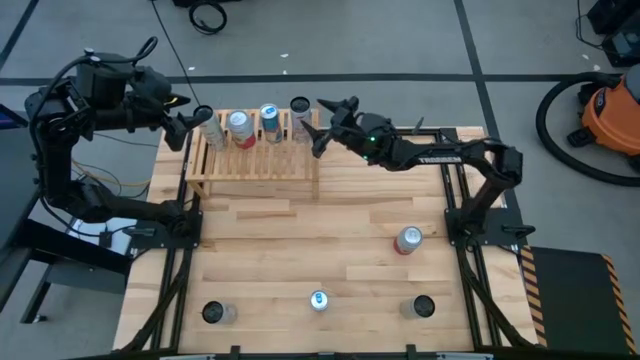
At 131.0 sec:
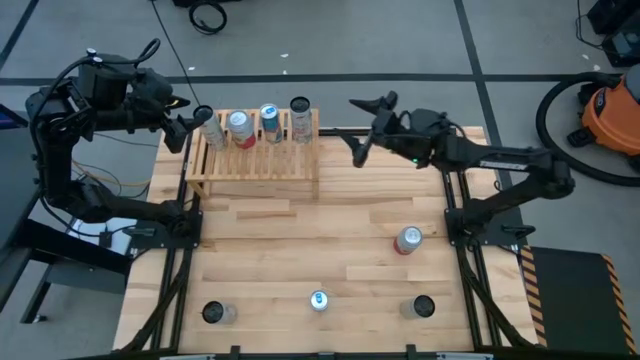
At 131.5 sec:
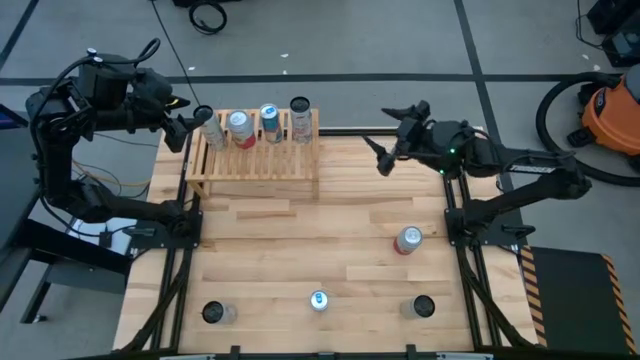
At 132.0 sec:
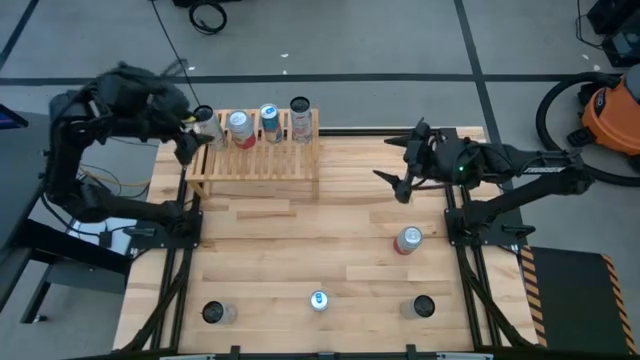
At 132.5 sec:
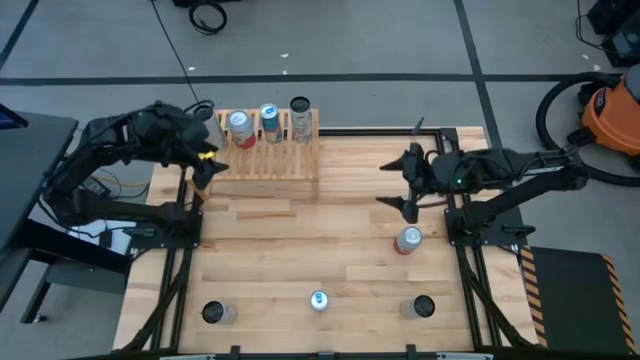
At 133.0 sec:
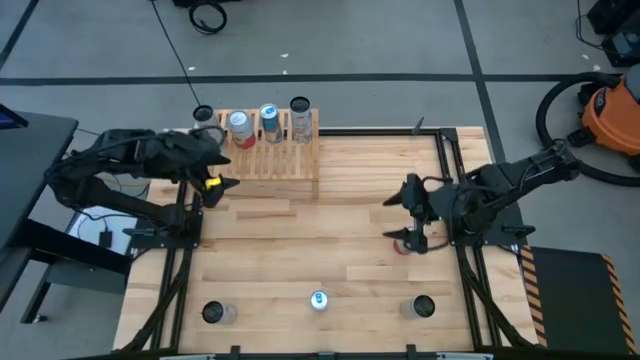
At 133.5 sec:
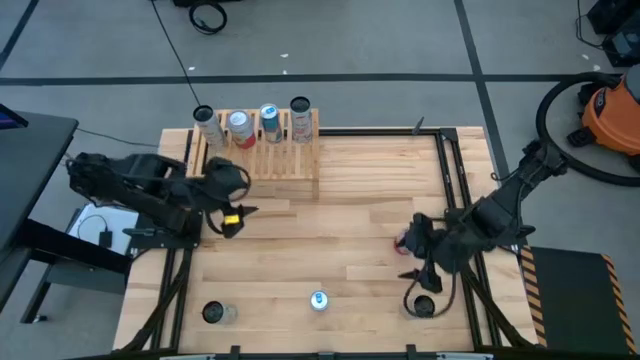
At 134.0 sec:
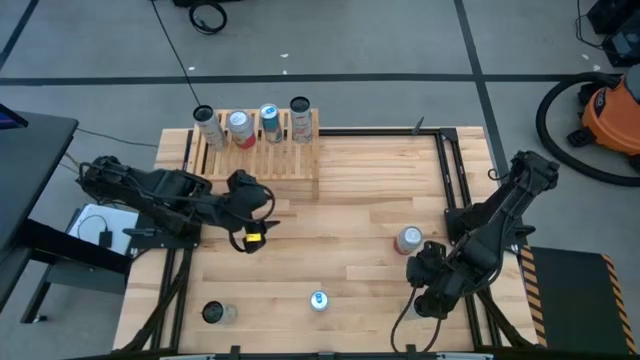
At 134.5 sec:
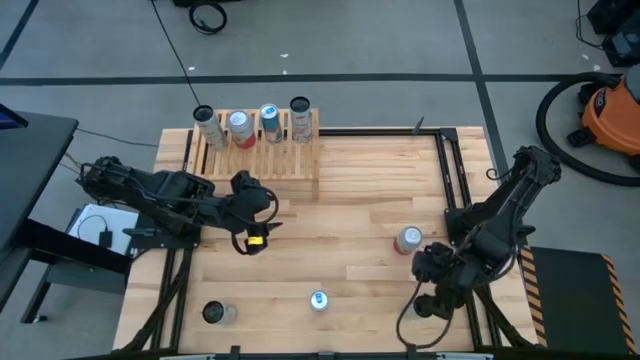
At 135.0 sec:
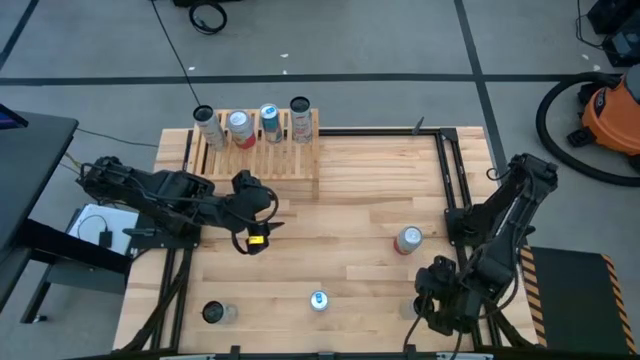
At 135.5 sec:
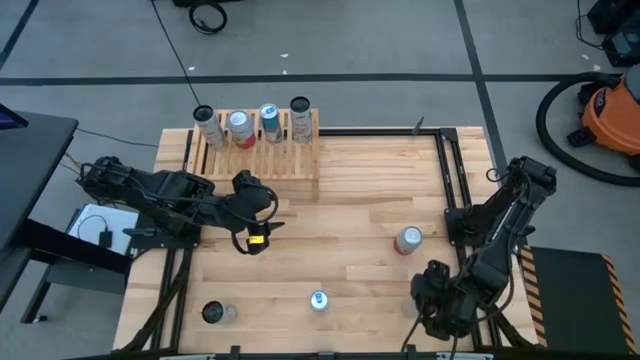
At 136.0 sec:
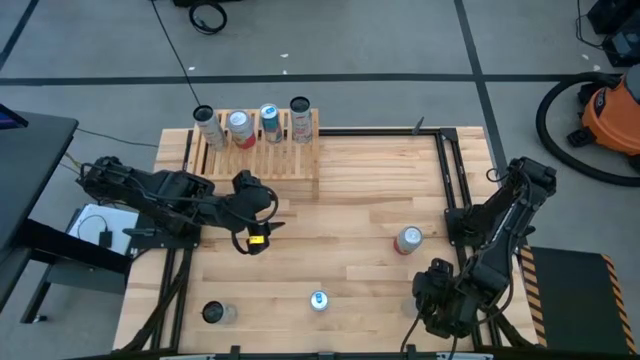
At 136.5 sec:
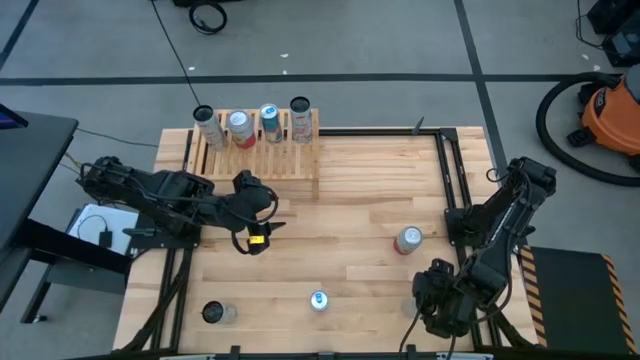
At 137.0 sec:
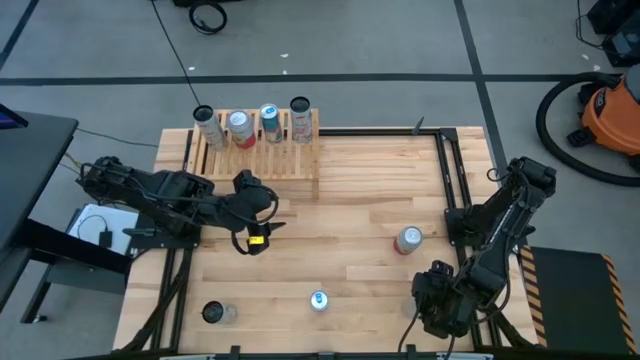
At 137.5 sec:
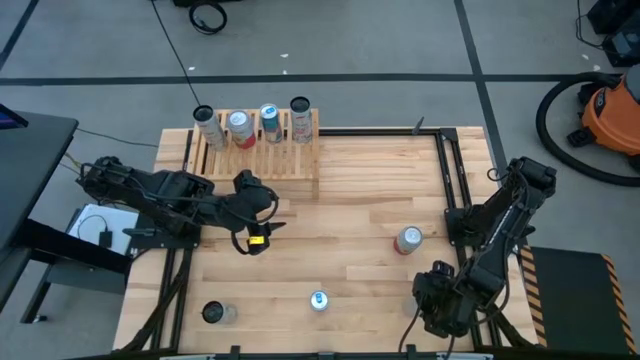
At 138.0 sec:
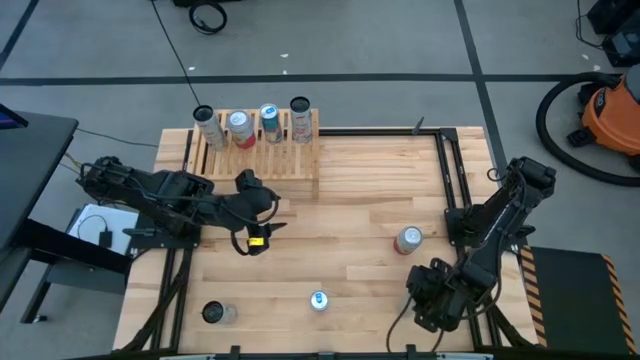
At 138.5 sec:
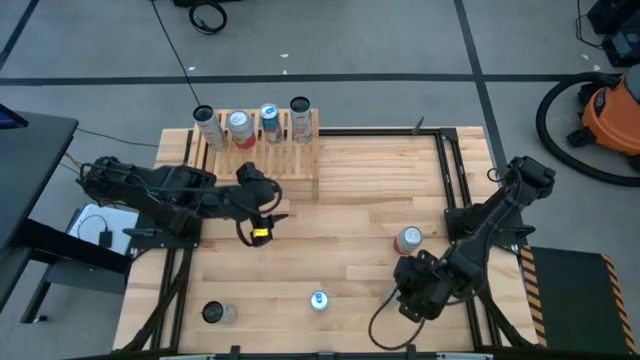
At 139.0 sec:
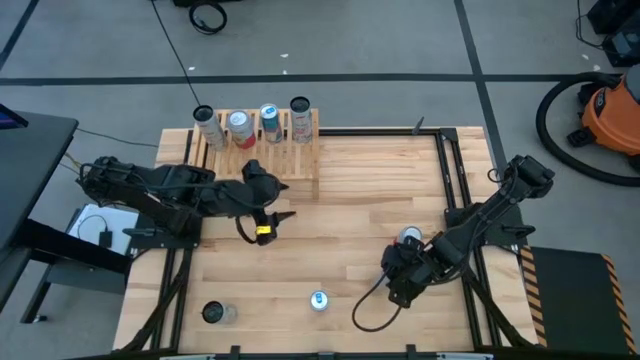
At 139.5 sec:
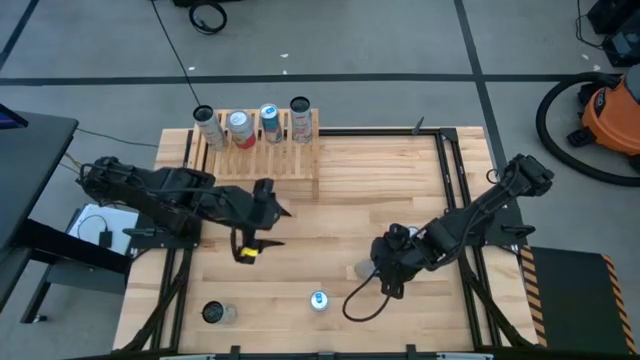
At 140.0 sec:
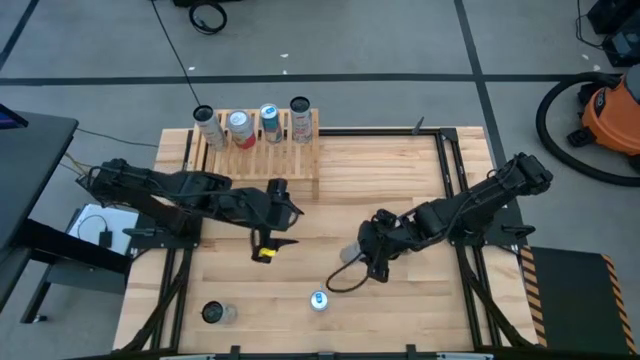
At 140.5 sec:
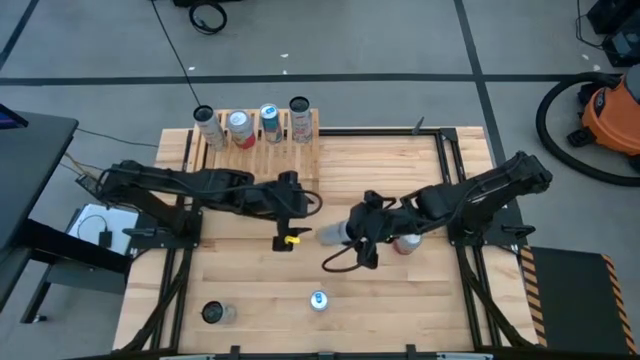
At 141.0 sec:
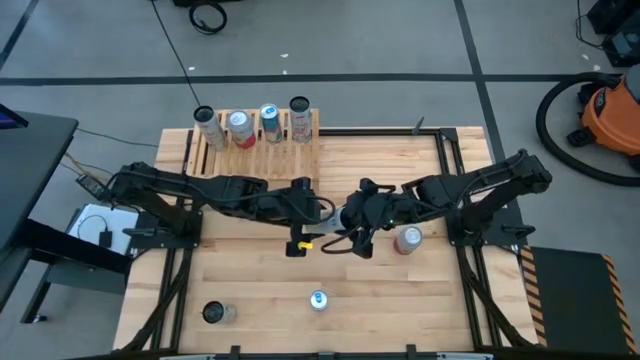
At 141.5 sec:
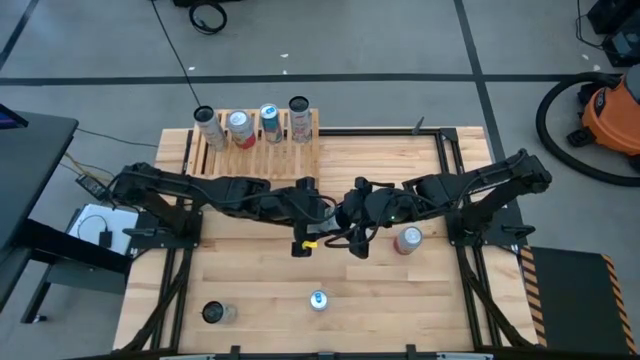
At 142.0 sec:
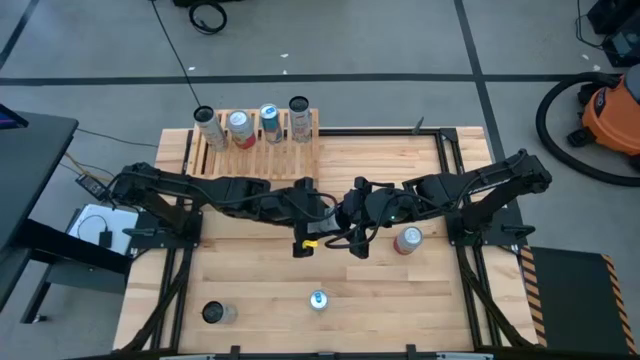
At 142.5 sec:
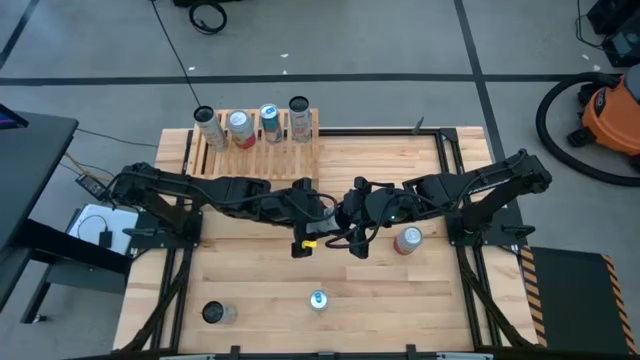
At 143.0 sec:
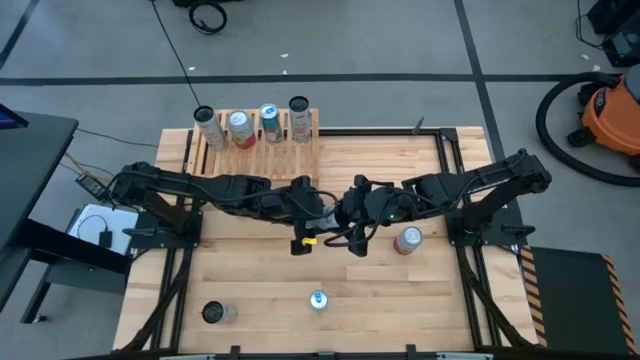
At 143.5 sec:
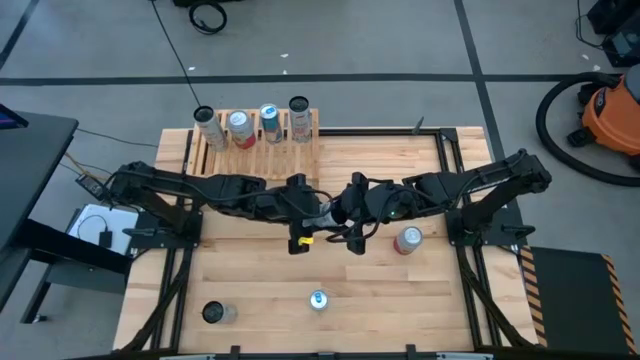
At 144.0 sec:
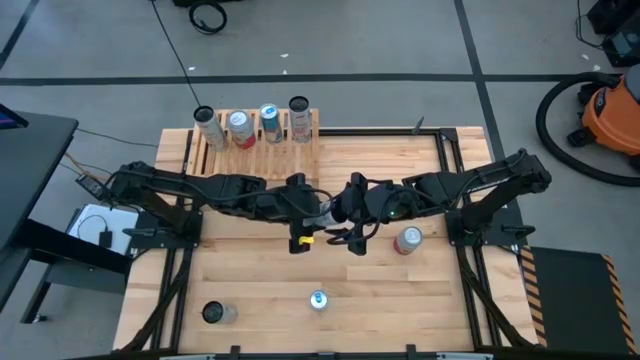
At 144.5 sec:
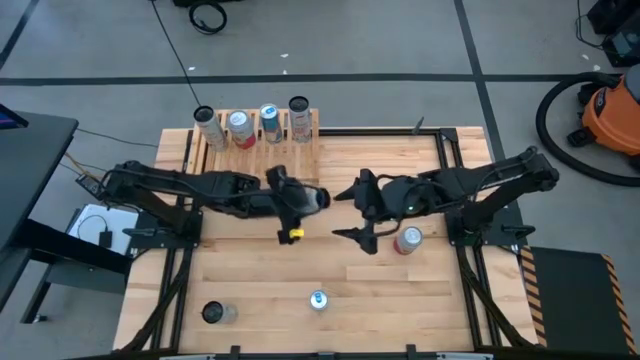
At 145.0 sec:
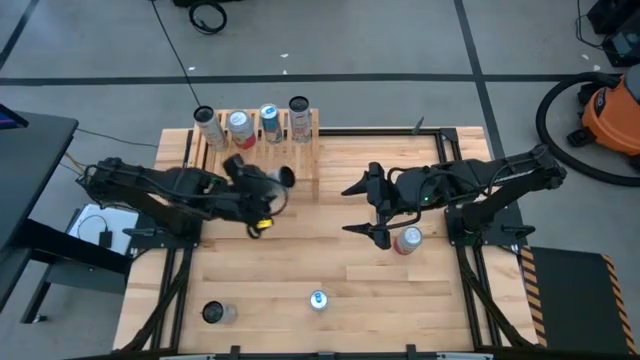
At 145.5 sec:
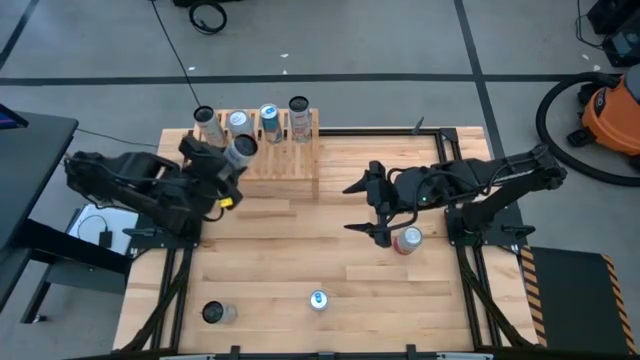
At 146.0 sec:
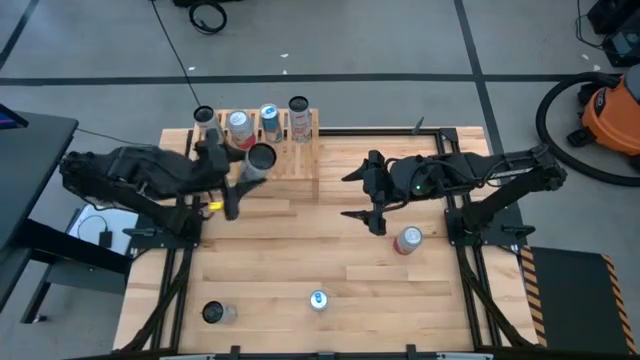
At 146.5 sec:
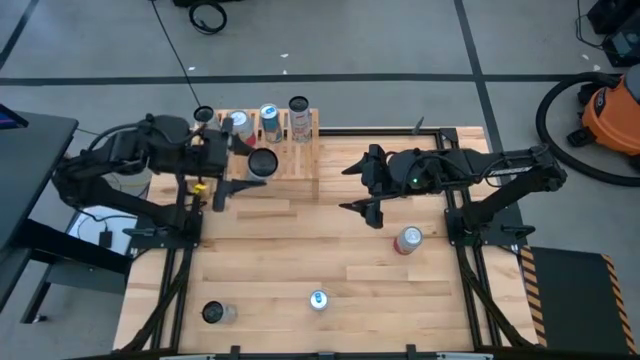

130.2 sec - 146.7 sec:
Task: Place canned beverage on shelf
Put the white yellow soda can on the shelf aligned with the other white yellow soda can

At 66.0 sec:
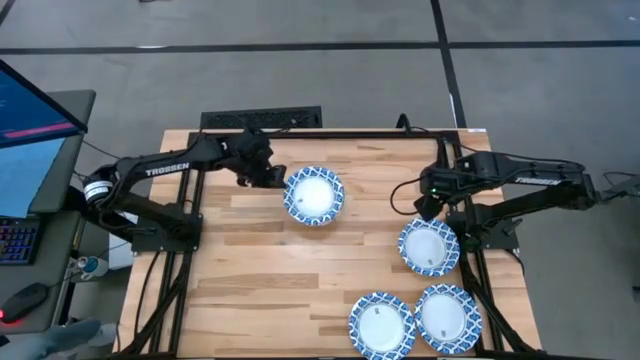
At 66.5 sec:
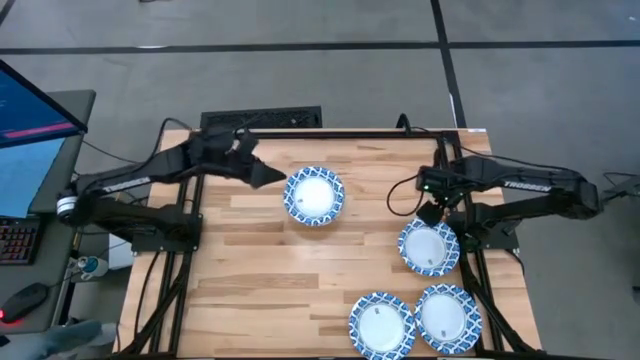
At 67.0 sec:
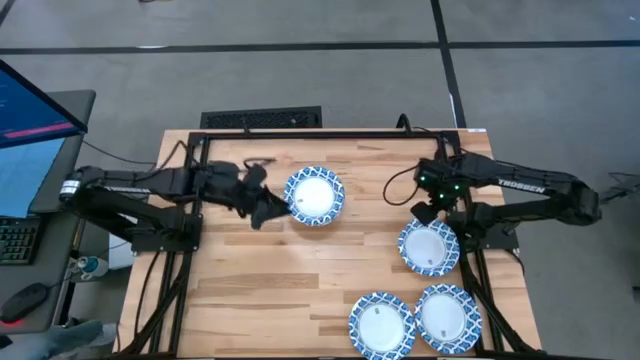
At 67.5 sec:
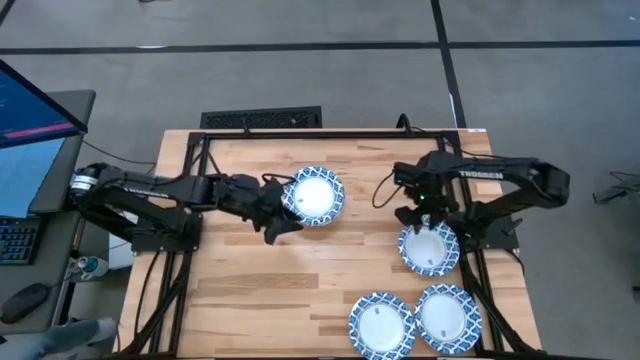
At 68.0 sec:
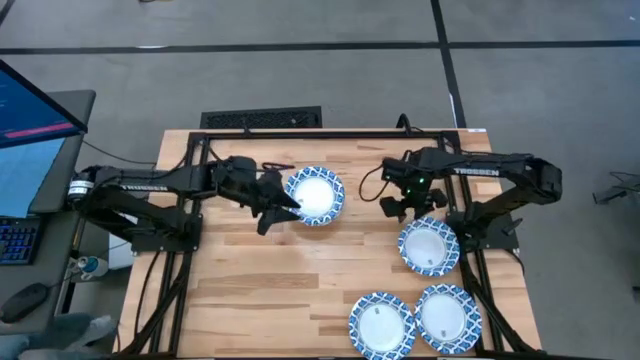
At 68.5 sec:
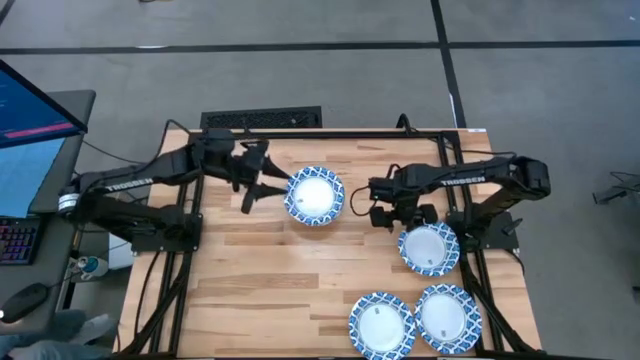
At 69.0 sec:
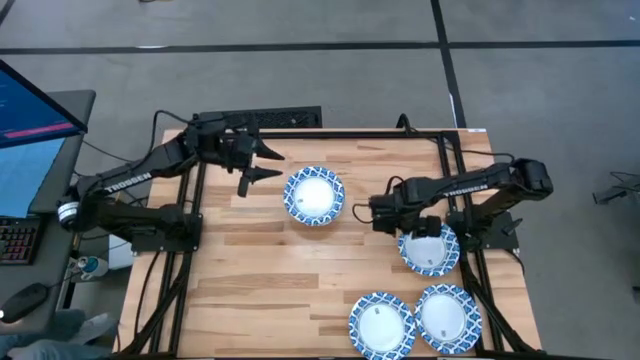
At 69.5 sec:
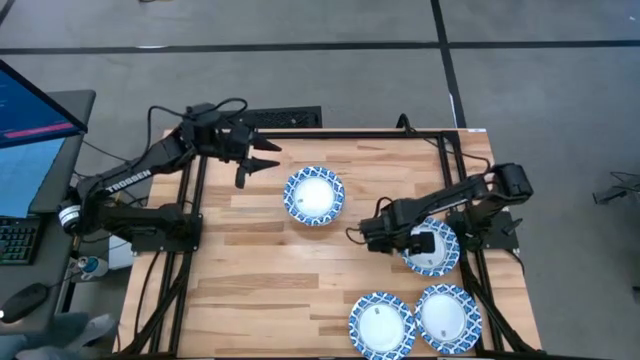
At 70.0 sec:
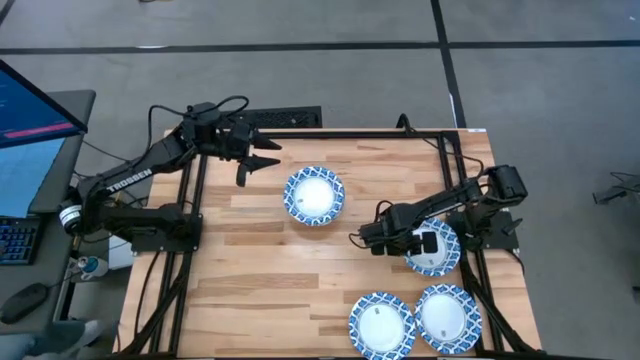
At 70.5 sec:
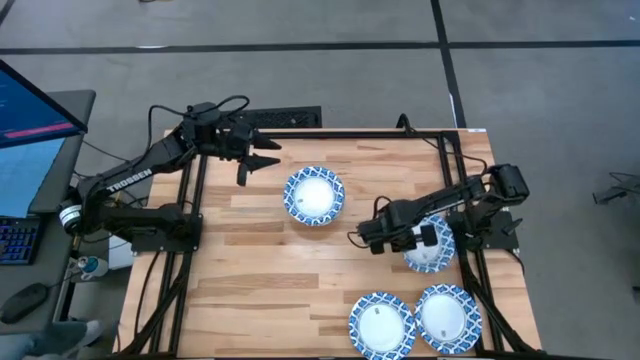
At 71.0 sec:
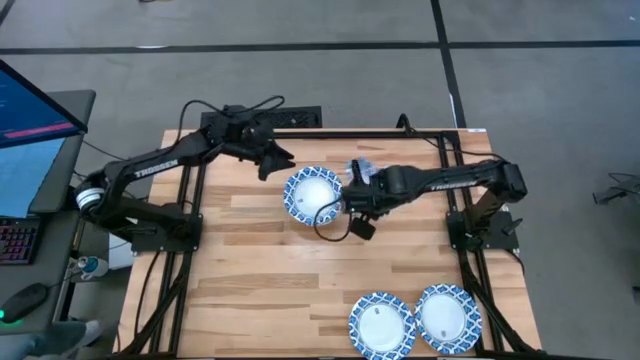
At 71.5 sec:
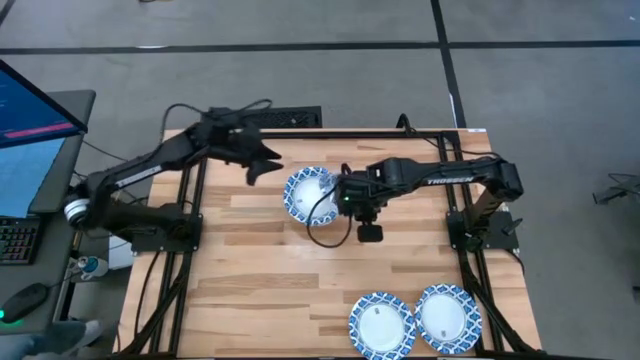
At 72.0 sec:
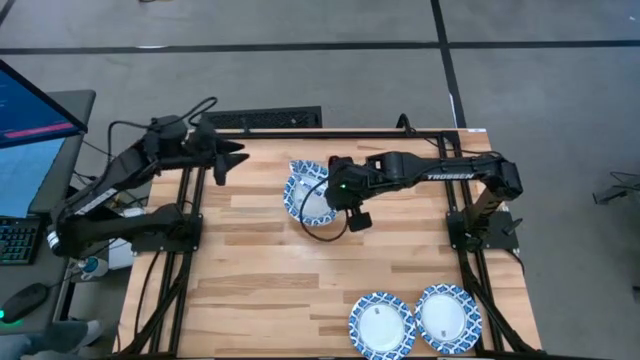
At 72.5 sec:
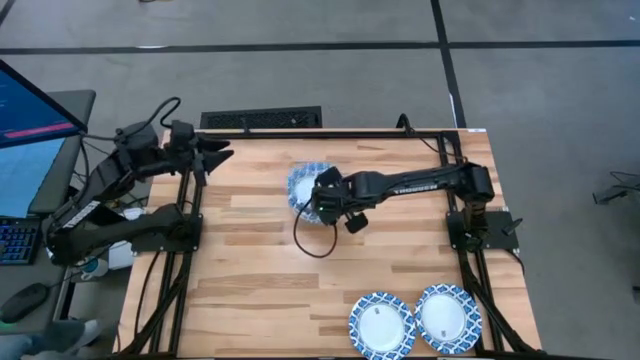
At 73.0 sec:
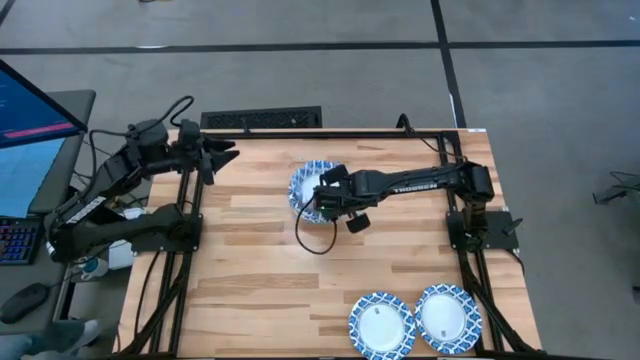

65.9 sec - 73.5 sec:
Task: Nest bowls inside each other
Stack the white bowl on the stacked white bowls
